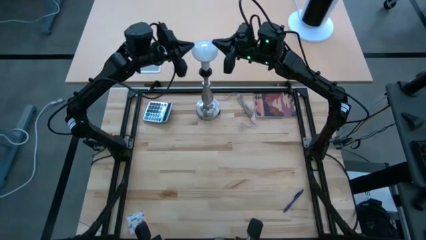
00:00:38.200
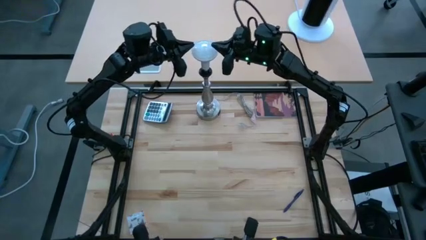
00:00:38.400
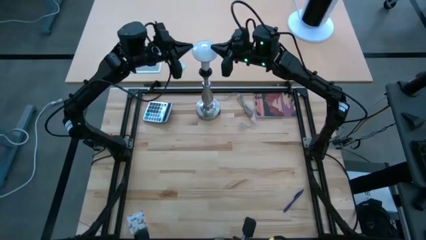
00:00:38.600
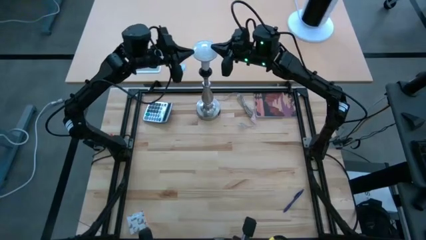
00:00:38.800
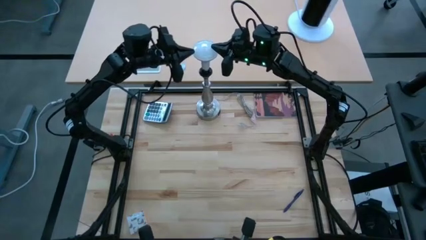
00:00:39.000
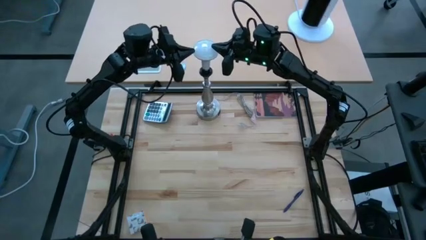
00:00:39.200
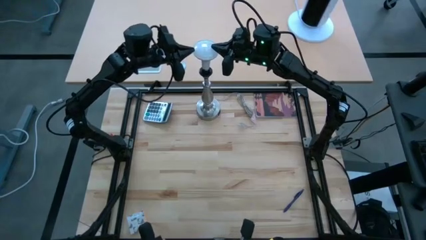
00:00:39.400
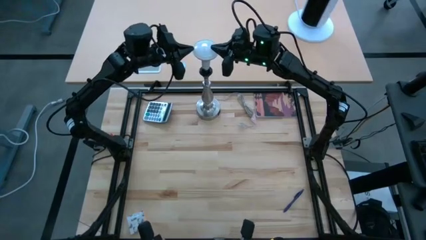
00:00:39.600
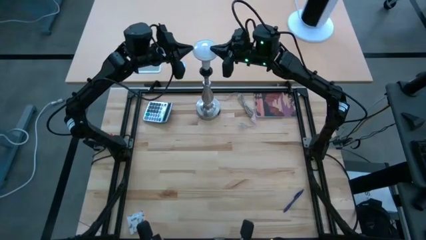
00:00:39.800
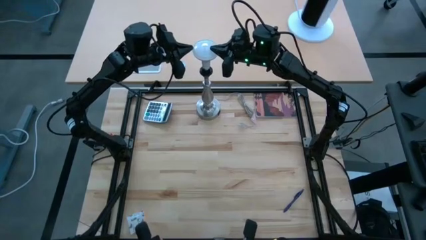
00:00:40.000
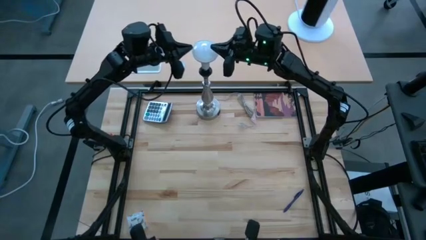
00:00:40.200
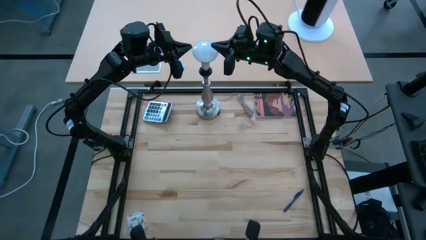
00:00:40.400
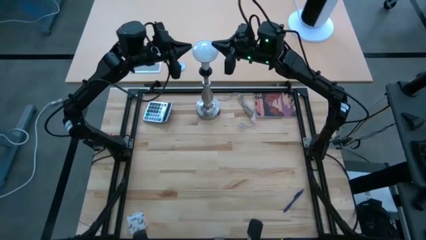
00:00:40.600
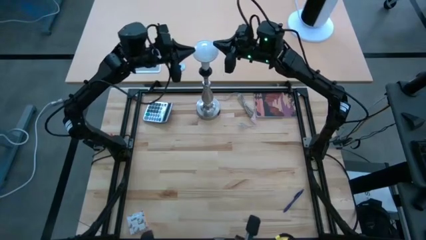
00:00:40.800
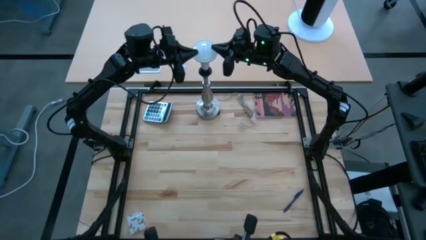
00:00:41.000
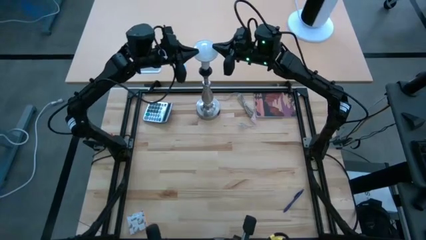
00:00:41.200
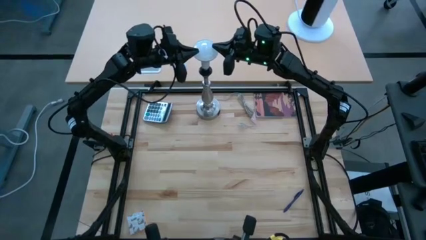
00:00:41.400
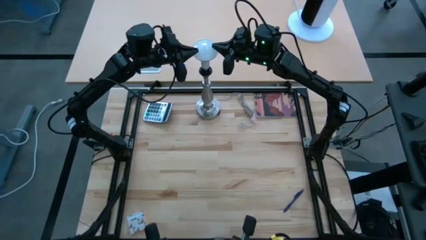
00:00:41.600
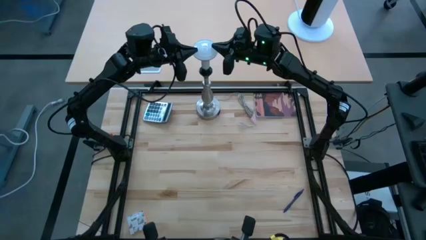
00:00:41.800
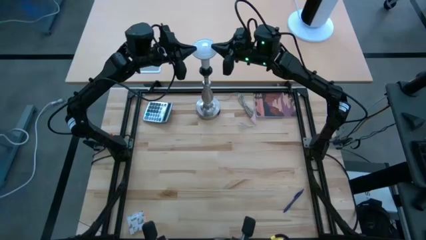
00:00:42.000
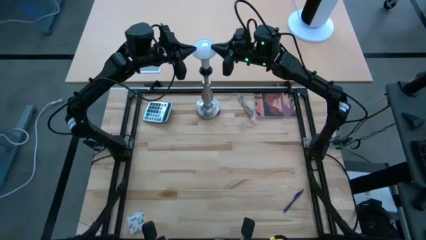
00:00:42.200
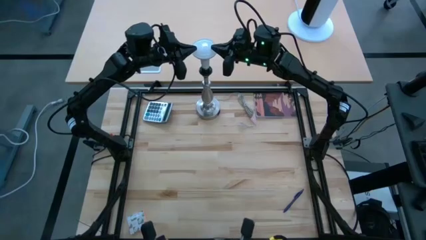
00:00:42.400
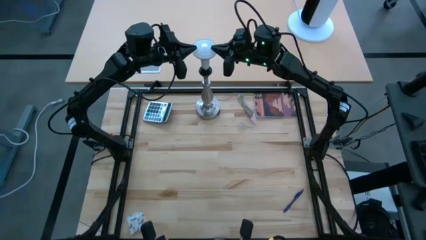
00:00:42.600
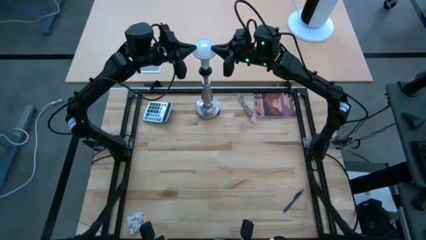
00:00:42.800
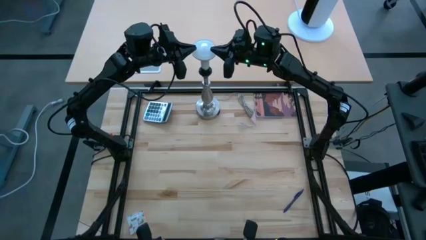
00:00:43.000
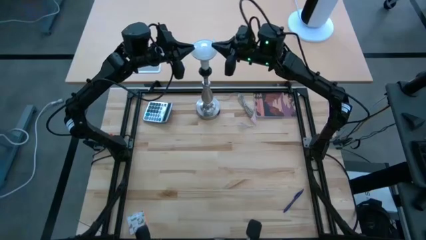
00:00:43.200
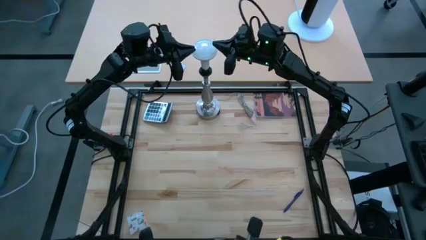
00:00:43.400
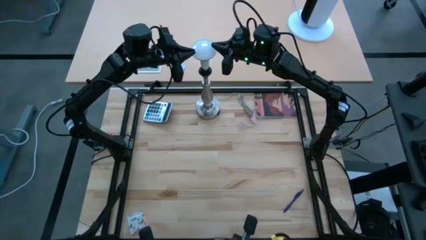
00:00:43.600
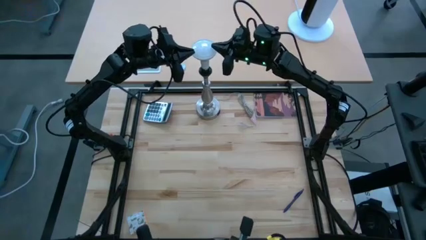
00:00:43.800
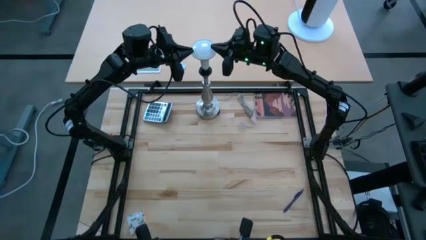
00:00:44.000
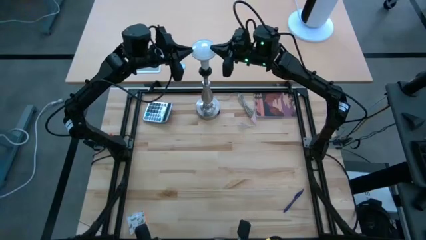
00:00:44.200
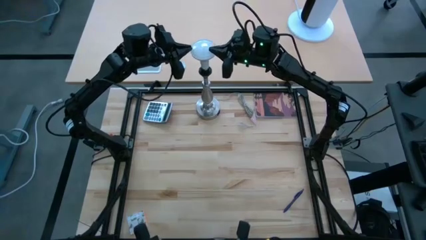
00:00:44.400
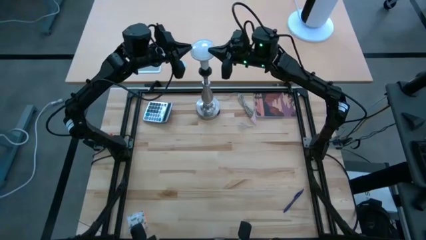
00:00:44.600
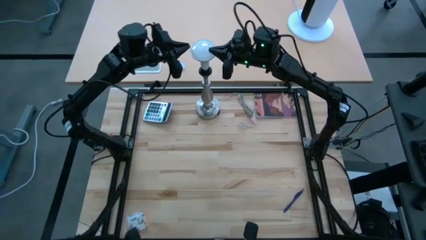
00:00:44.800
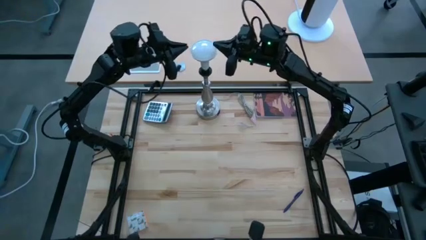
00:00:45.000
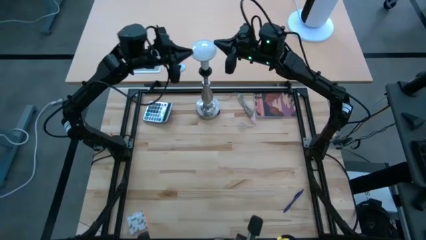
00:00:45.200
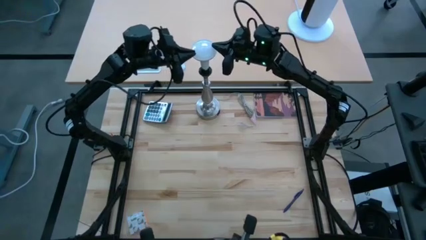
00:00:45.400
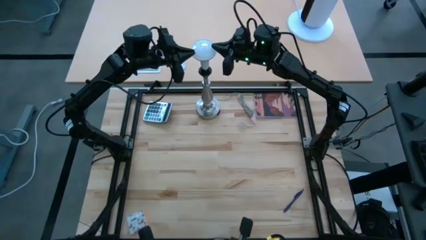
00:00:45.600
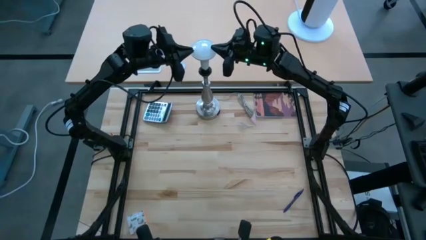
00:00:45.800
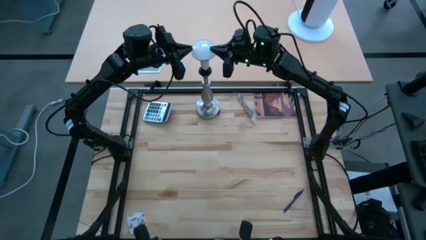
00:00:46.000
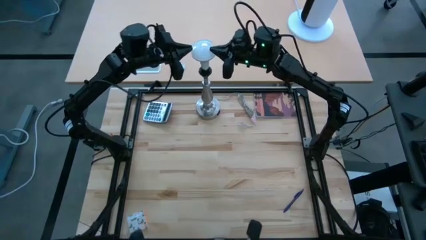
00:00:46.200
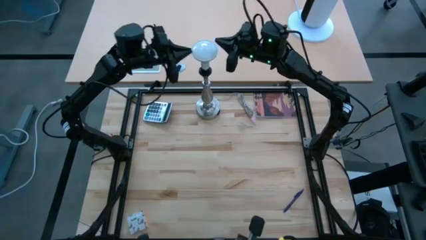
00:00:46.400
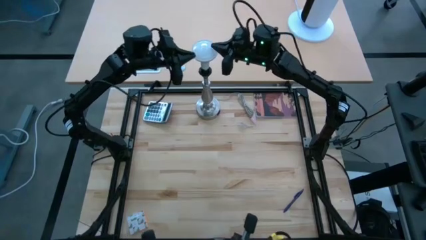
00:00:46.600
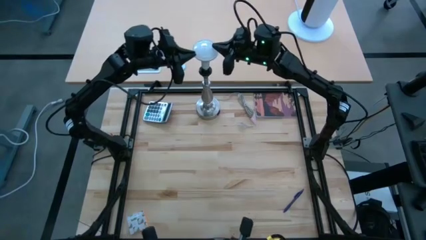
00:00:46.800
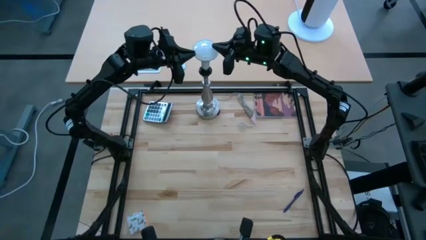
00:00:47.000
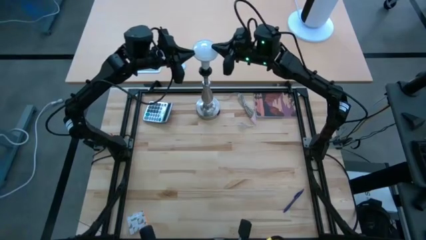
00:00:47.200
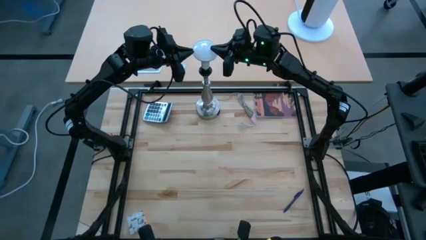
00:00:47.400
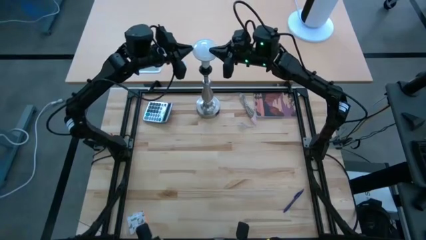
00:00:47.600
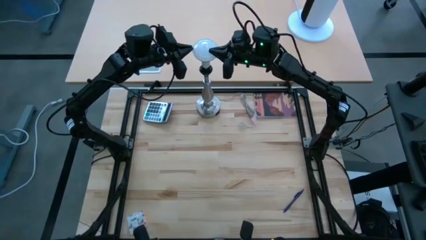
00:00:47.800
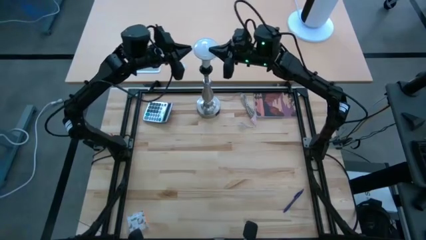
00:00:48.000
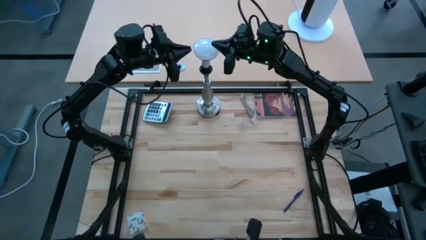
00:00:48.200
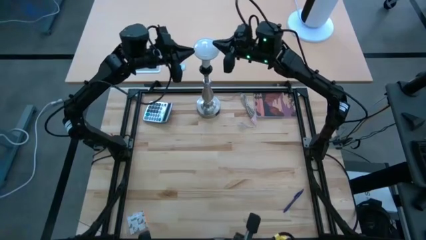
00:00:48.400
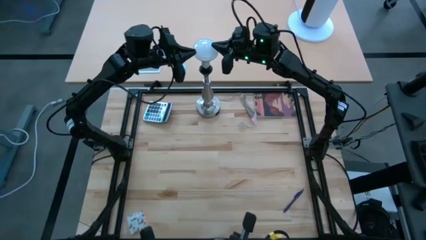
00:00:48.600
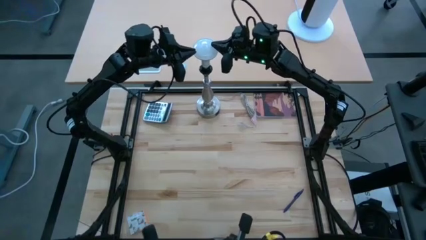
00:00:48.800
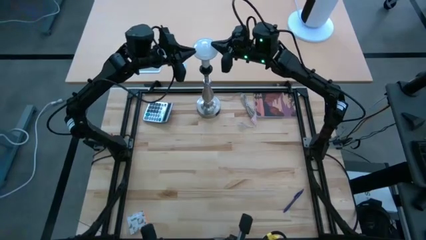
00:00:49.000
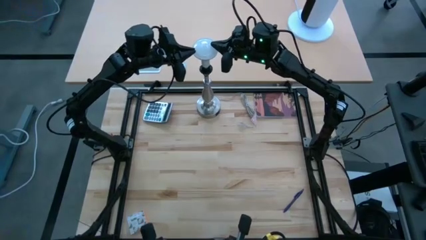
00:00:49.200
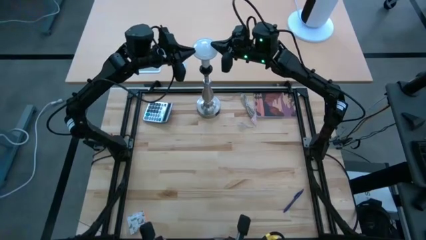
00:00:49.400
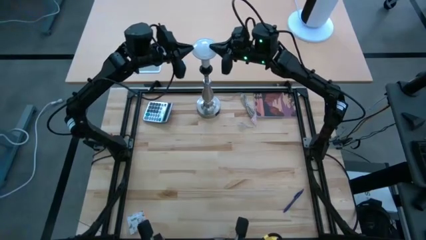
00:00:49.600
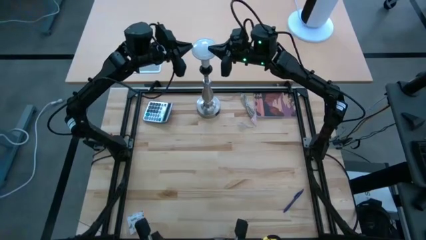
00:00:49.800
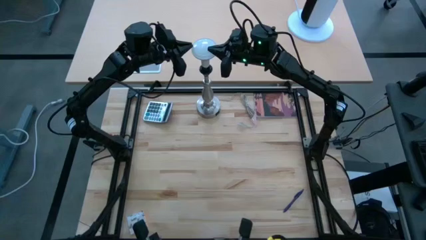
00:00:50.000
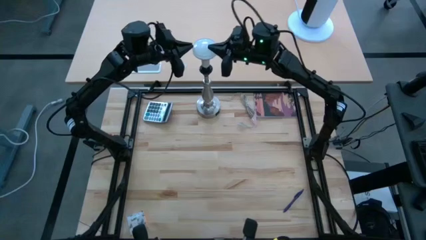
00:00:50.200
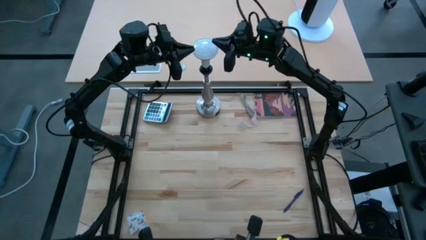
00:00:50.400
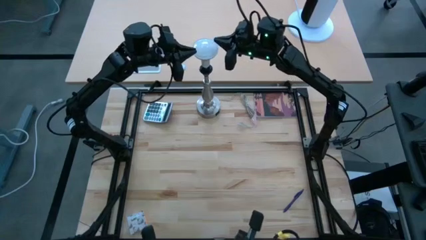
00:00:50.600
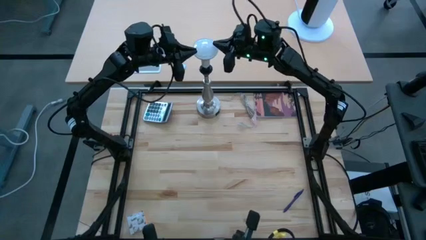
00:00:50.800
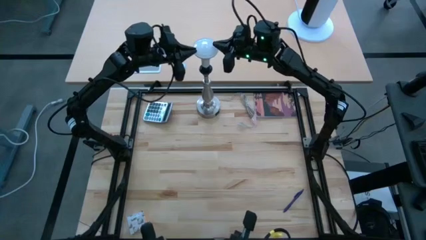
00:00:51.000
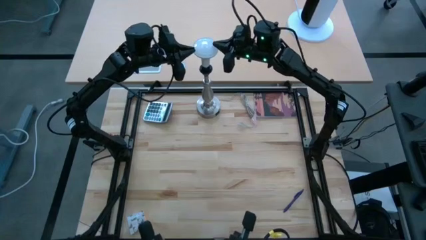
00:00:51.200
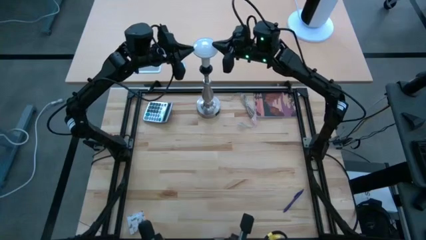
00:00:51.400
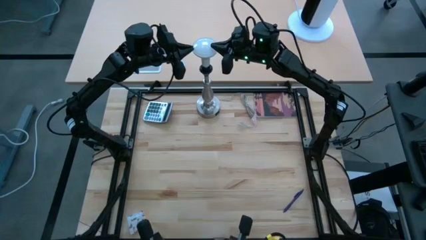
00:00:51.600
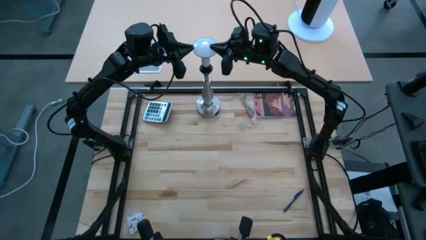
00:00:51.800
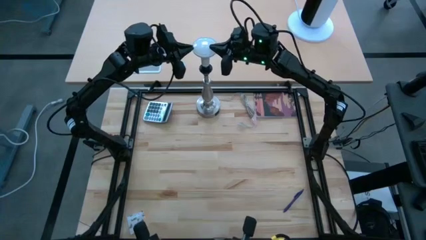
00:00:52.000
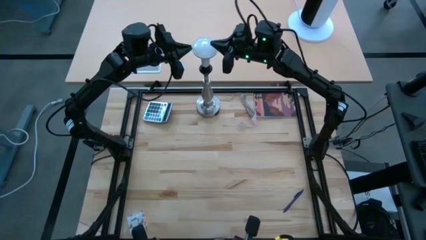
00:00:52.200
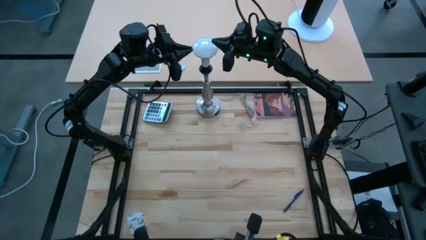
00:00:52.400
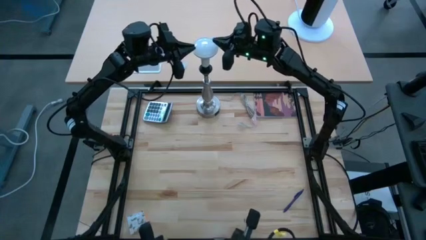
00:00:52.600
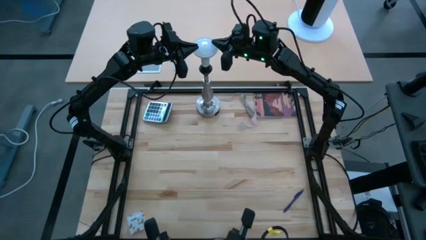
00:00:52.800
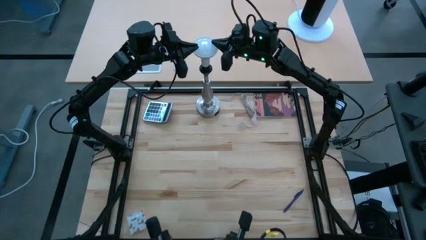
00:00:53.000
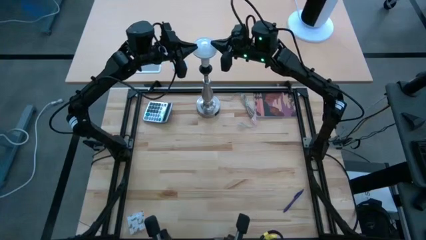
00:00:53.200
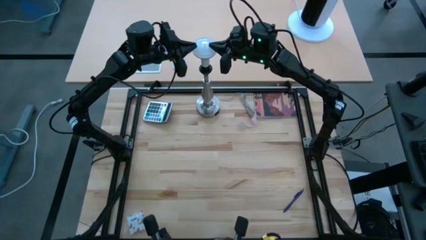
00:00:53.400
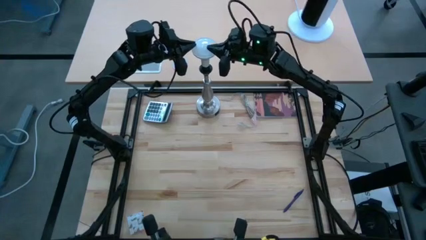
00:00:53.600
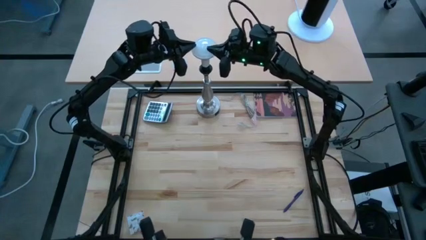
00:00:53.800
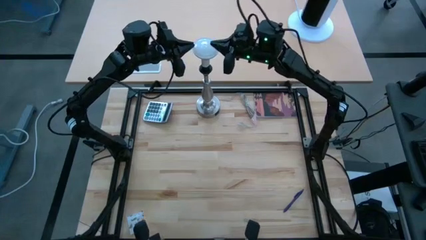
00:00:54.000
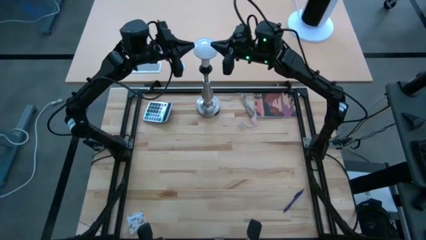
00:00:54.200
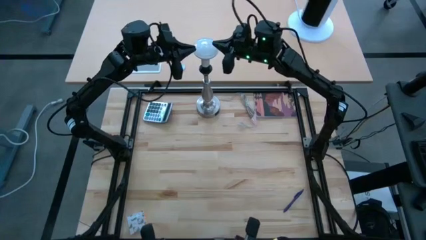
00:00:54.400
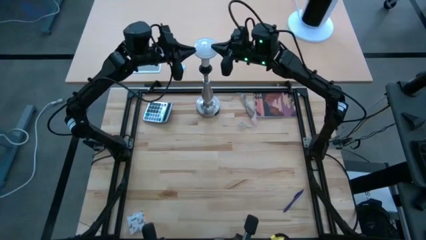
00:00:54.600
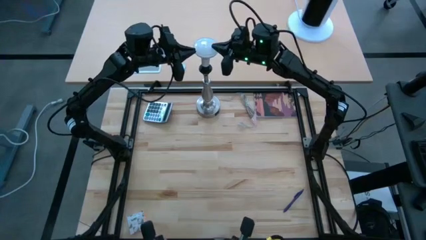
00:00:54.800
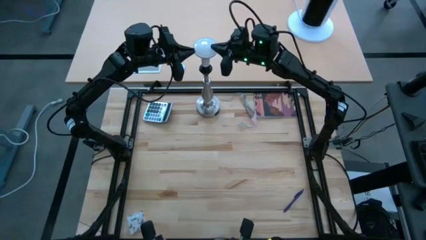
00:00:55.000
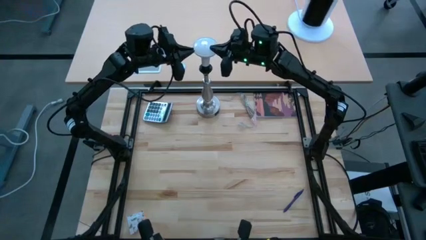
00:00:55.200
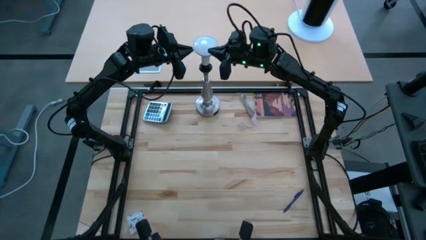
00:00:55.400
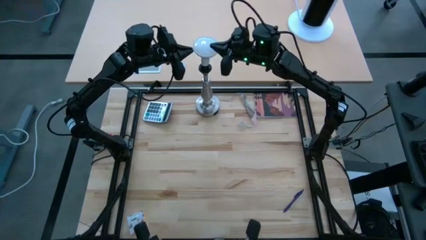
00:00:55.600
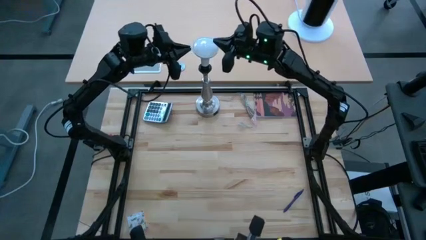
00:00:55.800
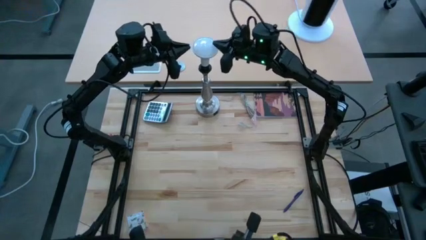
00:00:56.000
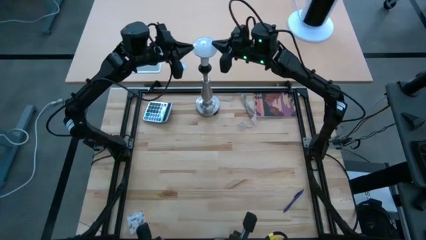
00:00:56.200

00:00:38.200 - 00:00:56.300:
Task: Screw lightbulb
Insert the lightbulb into the table lamp
